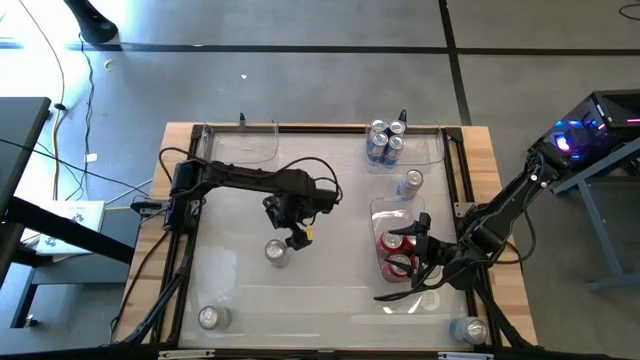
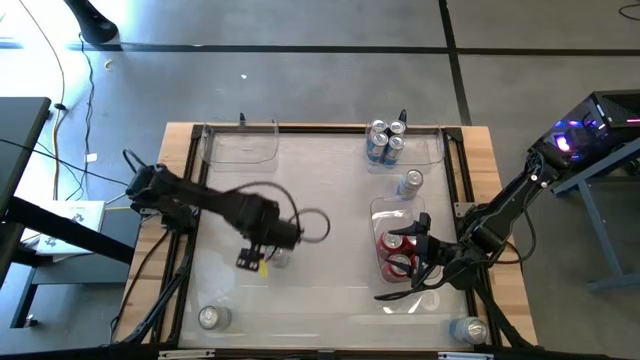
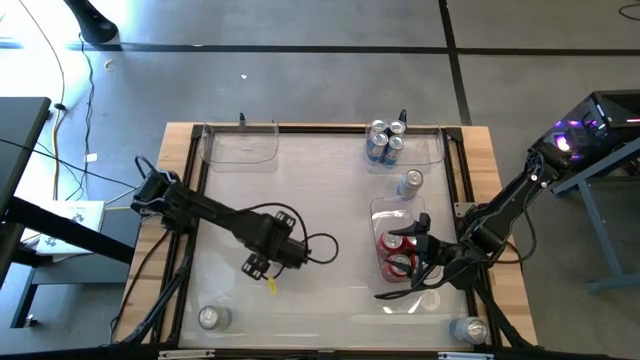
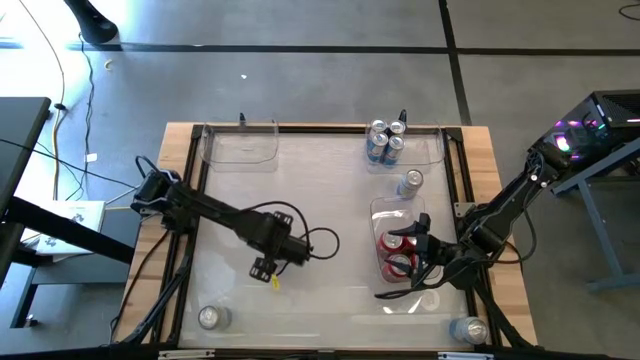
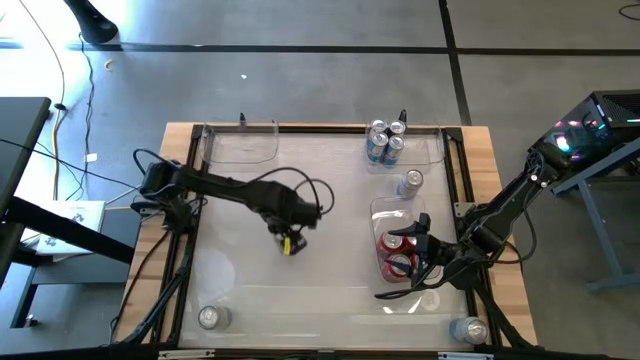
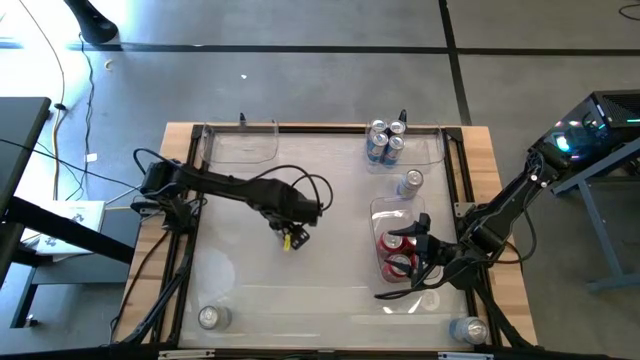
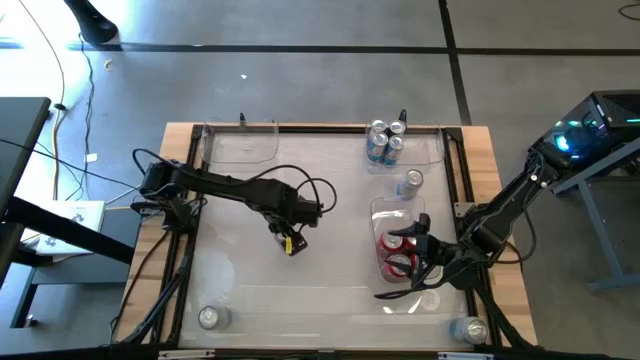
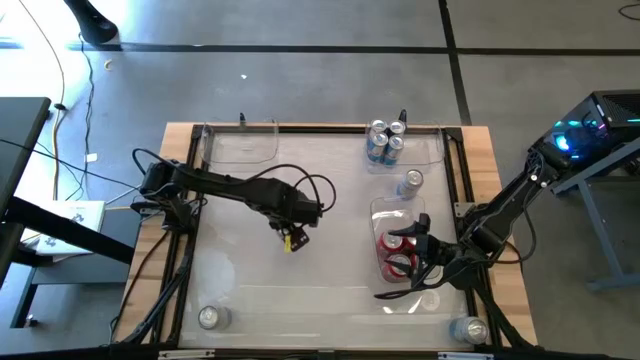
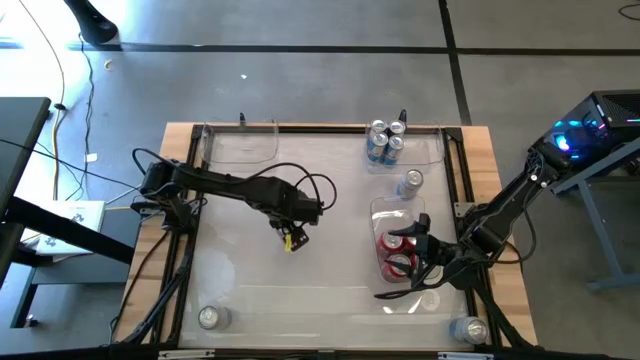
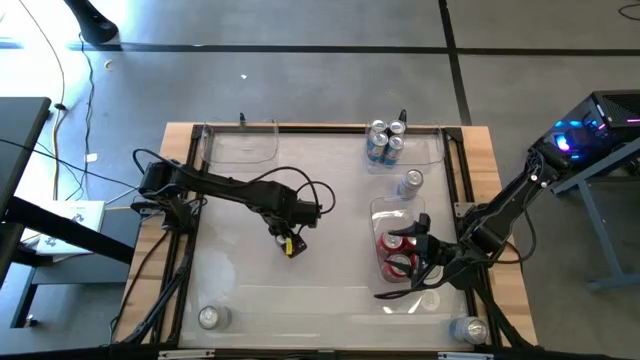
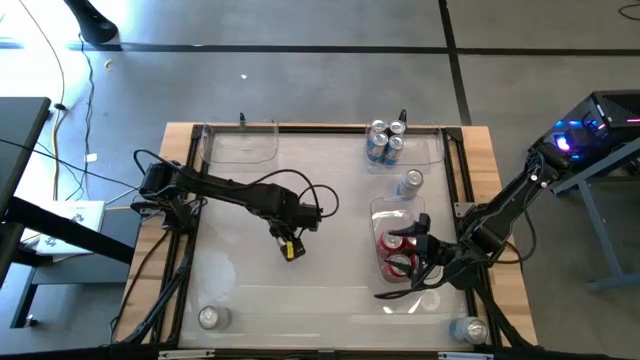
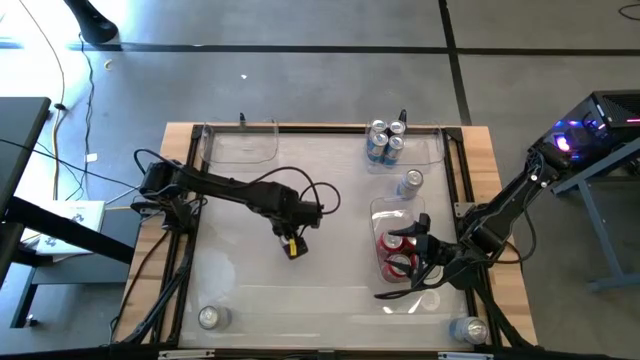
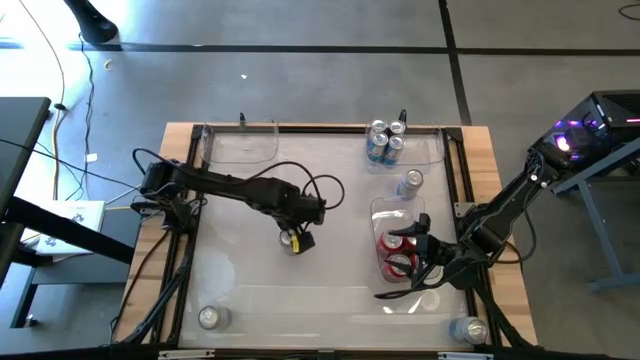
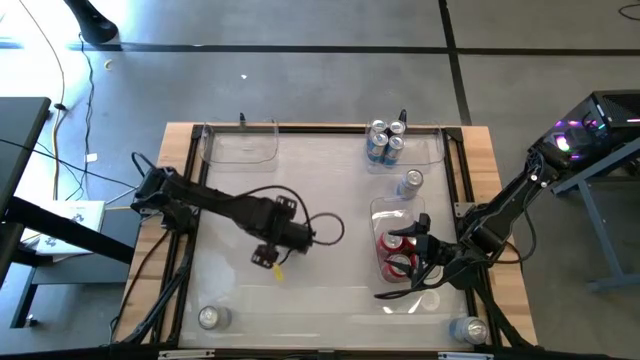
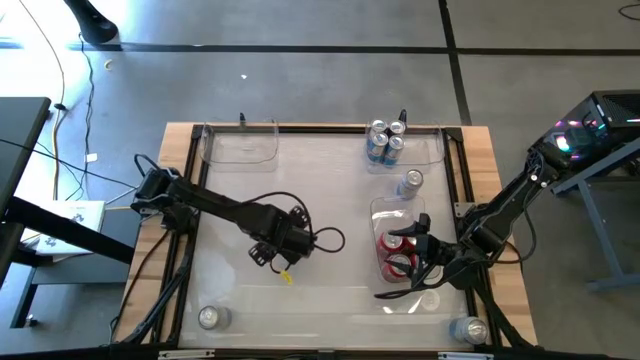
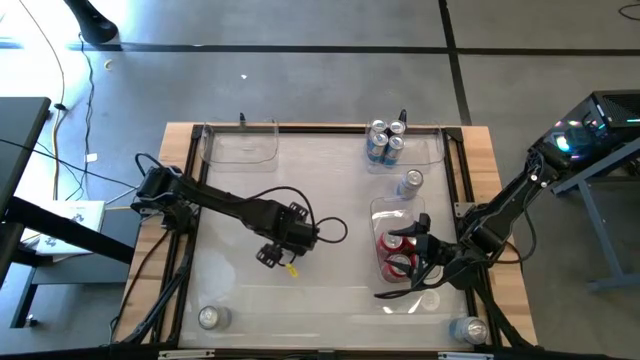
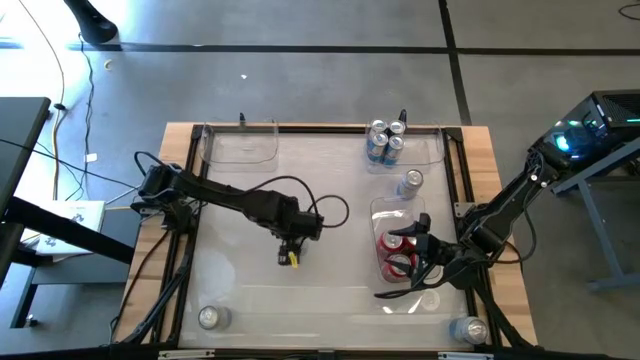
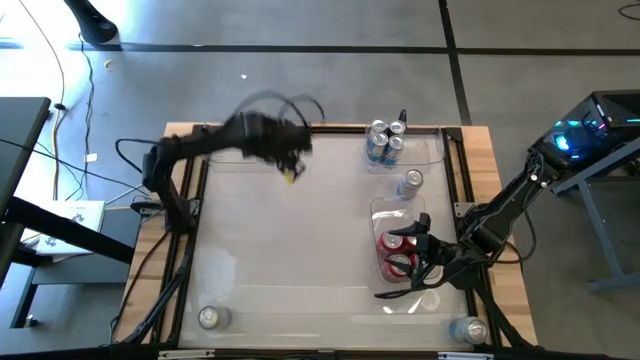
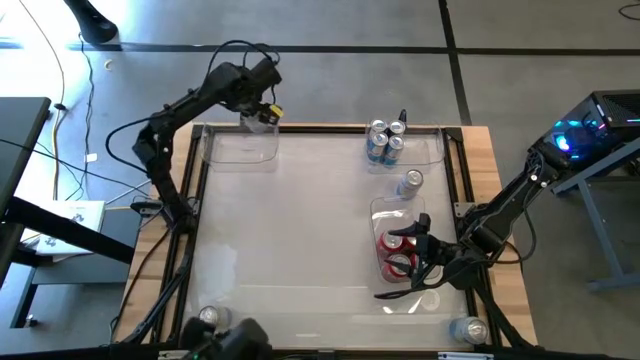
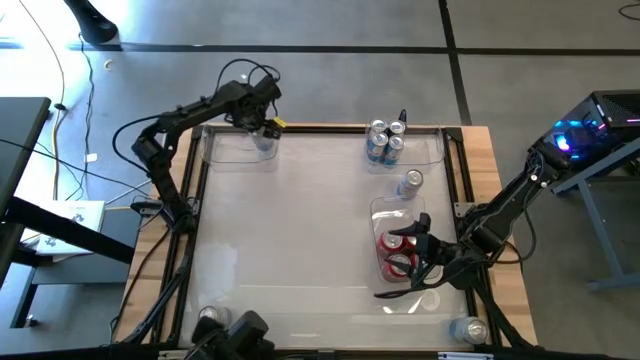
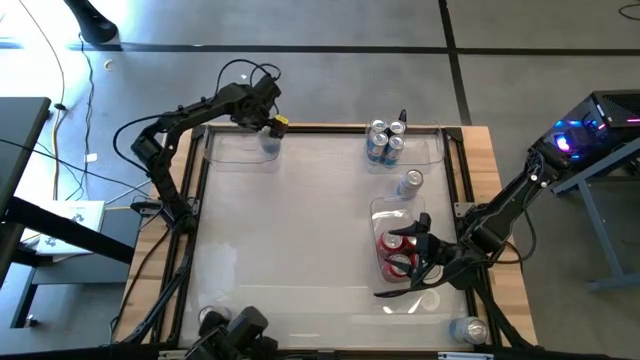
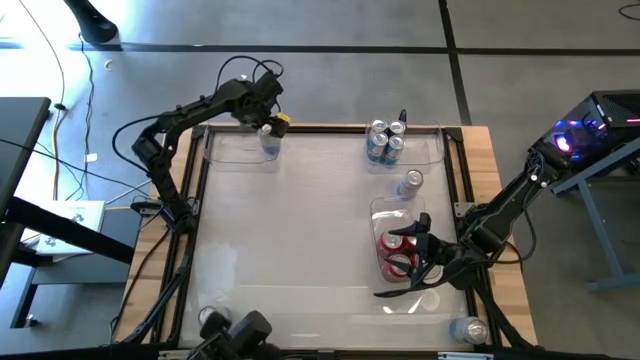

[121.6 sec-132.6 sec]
Task: Sort soda cans
Put the center white soda can into the top left transparent bin

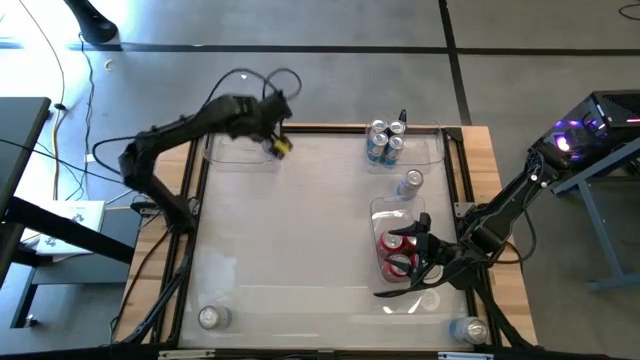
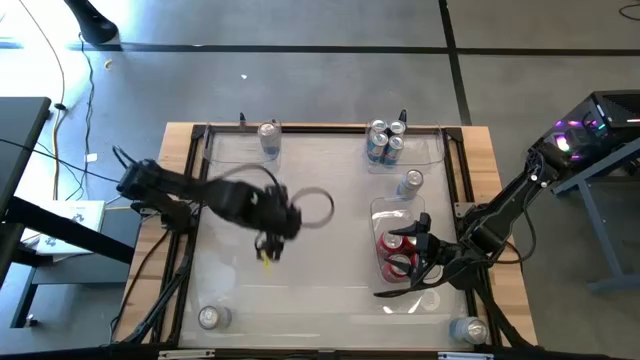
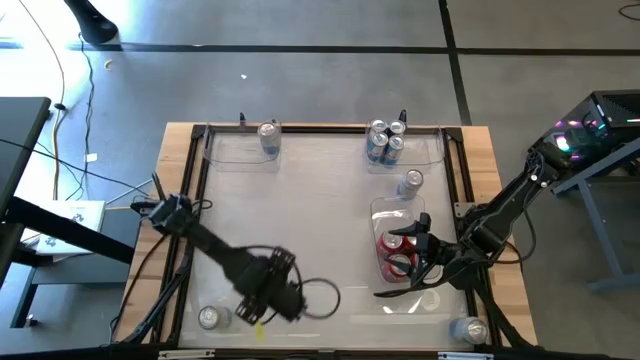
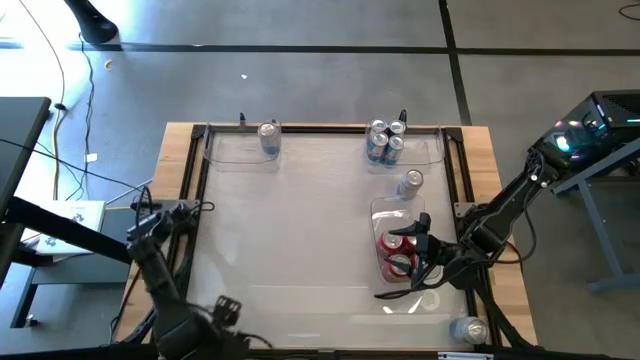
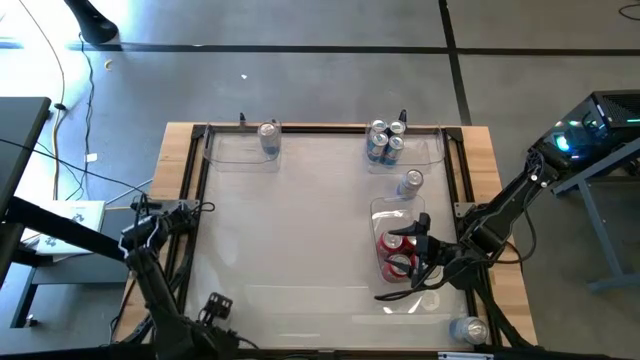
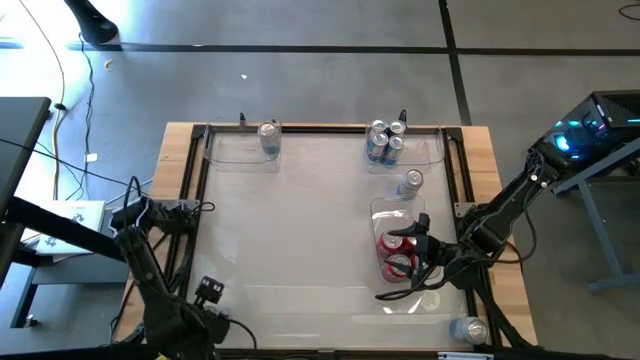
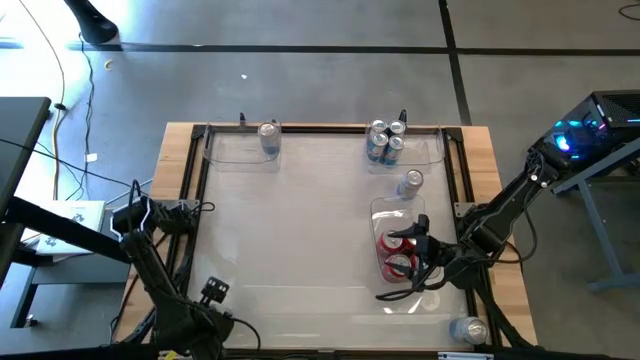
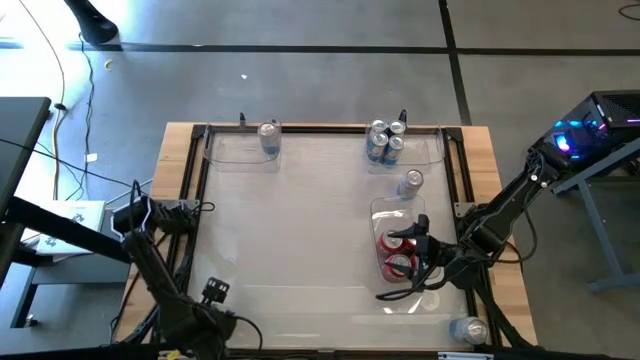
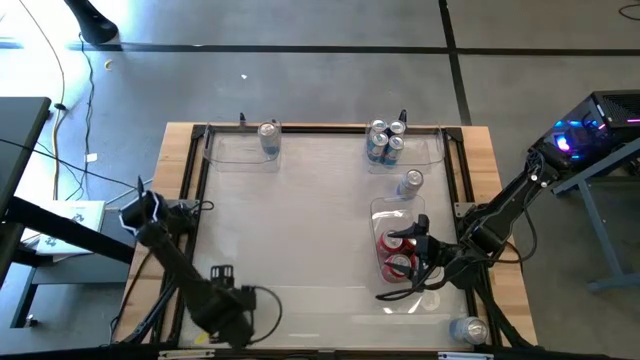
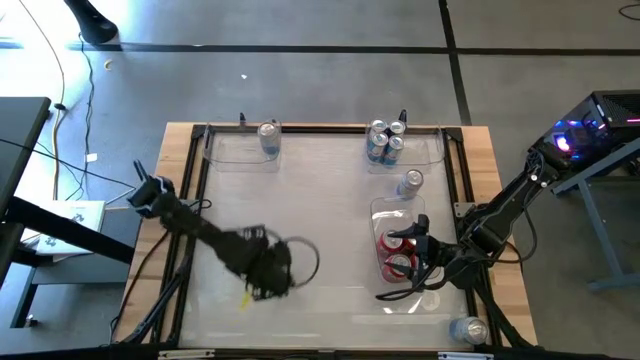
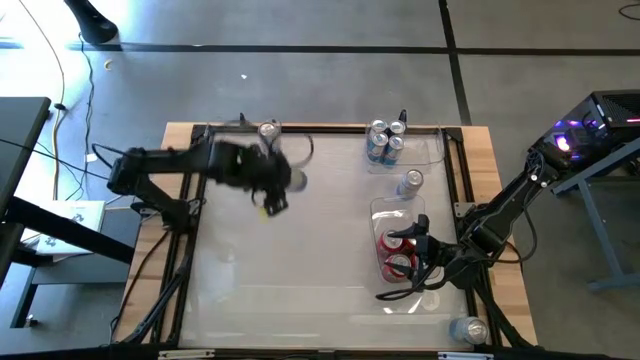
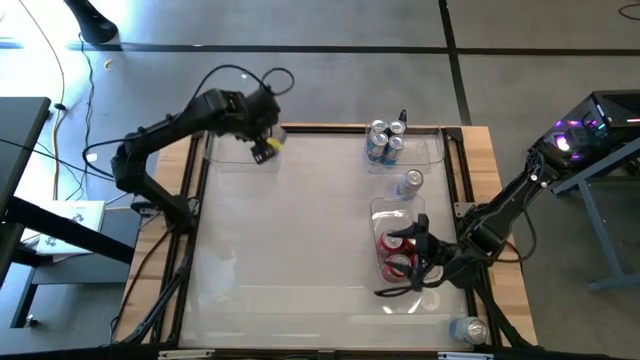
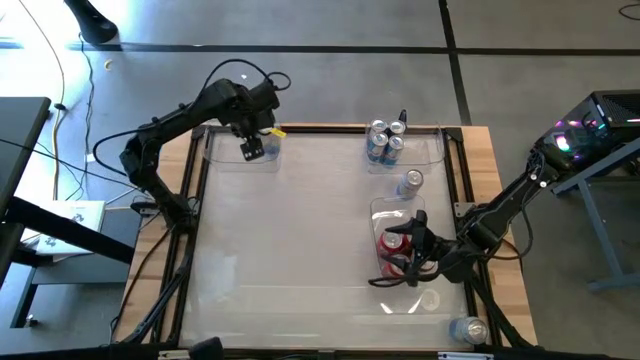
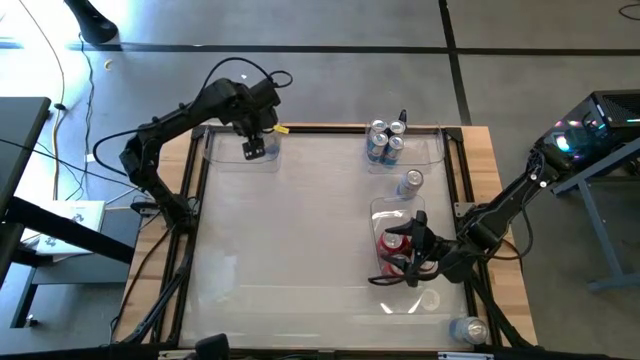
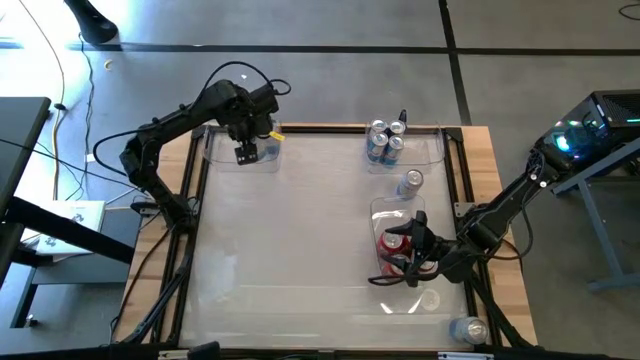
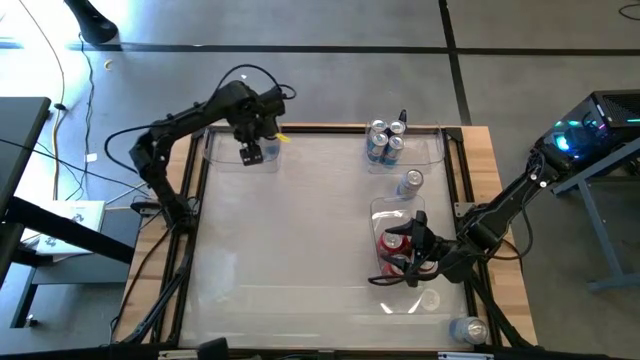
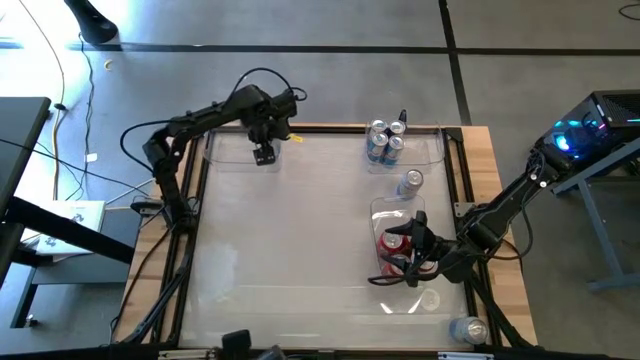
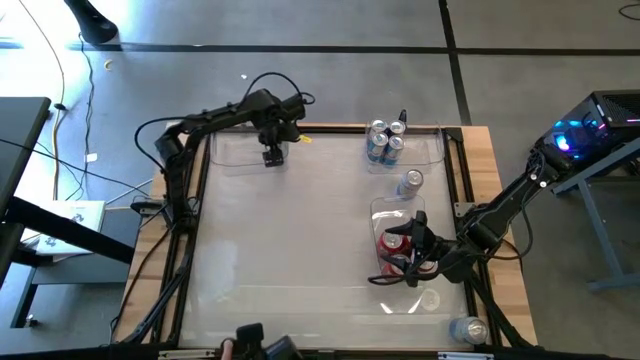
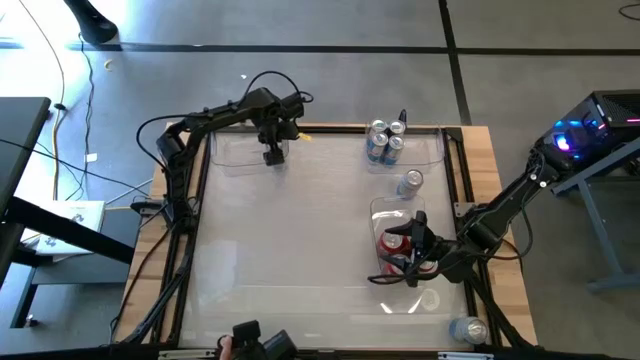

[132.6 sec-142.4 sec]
Put the bottom left white soda can into the top left transparent bin

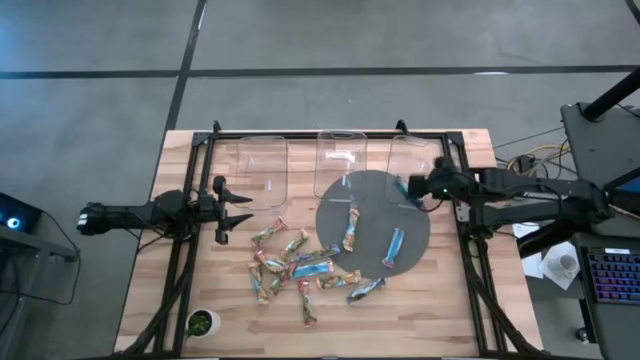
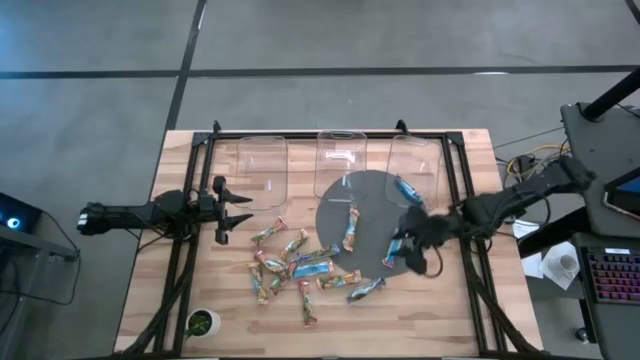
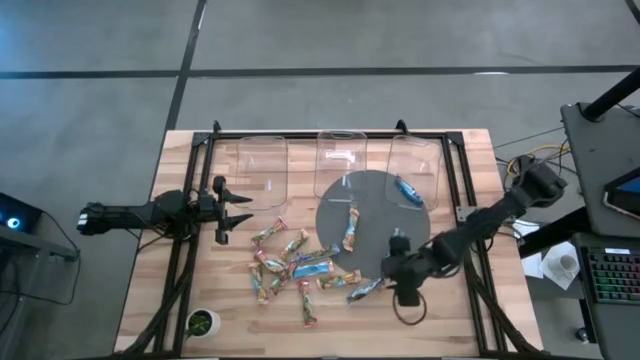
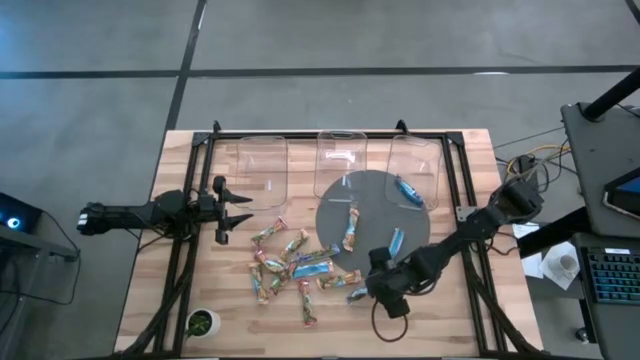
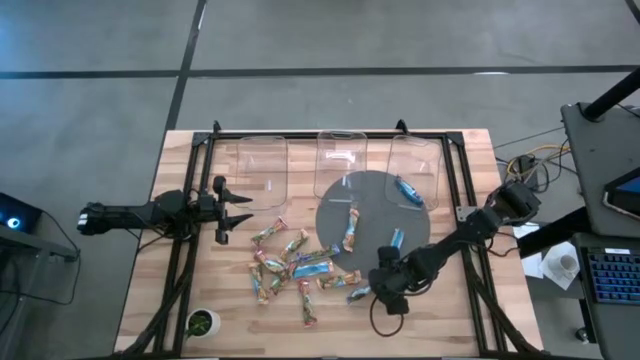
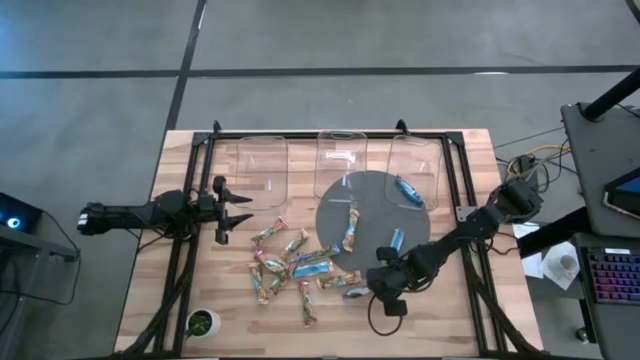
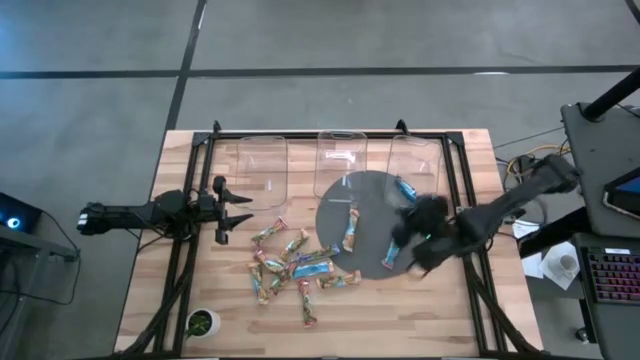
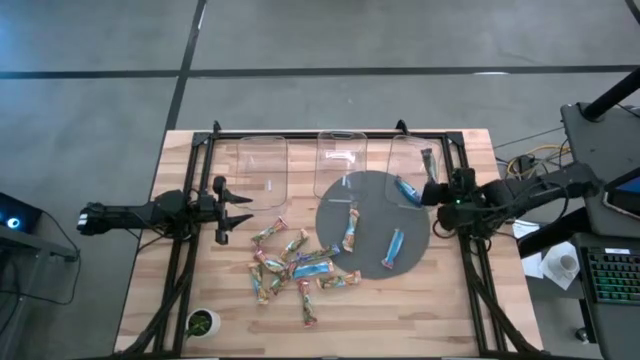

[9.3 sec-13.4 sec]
Task: Pick and place Granola Bars by type
Put the blue granola bar into the right transparent bin
